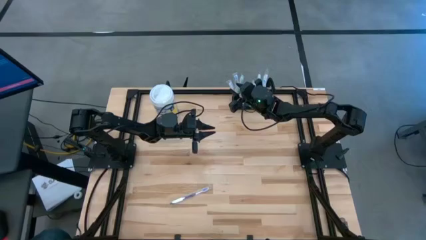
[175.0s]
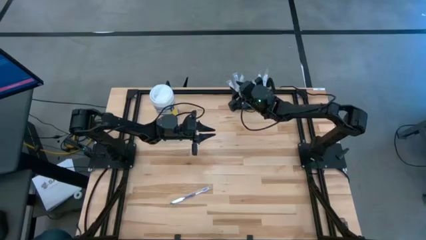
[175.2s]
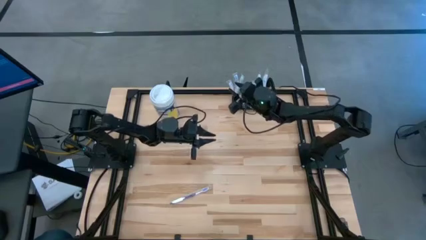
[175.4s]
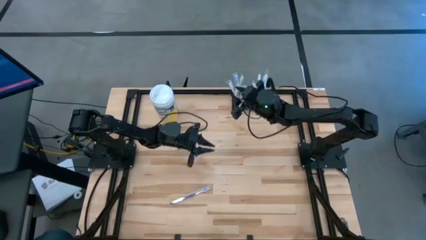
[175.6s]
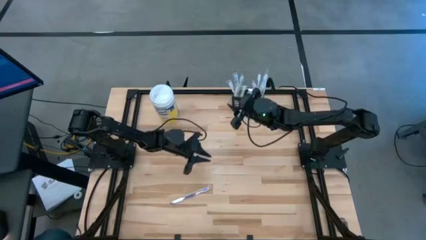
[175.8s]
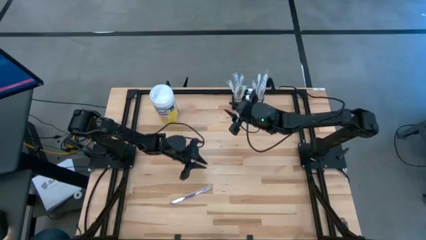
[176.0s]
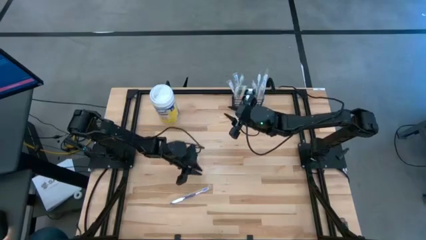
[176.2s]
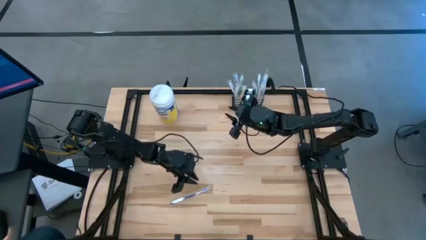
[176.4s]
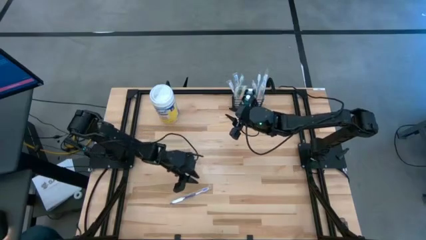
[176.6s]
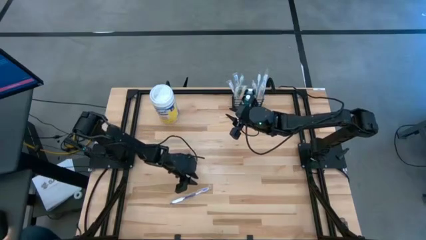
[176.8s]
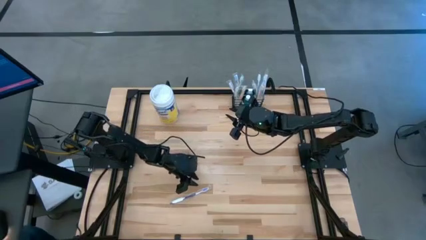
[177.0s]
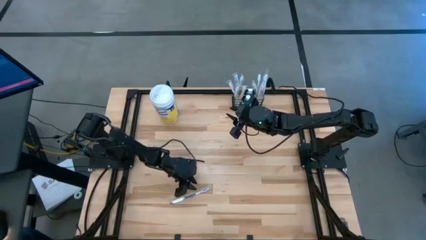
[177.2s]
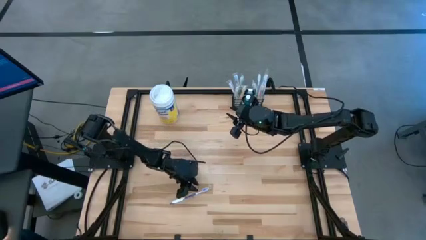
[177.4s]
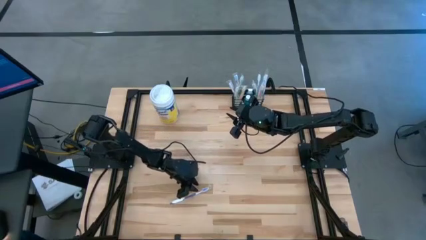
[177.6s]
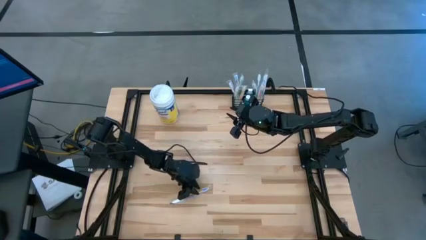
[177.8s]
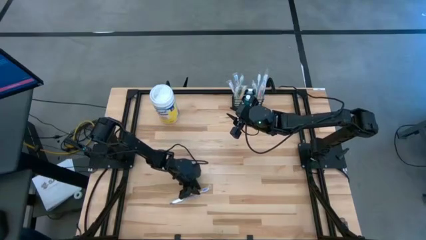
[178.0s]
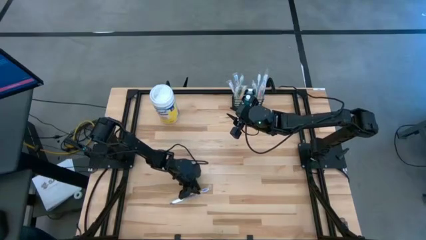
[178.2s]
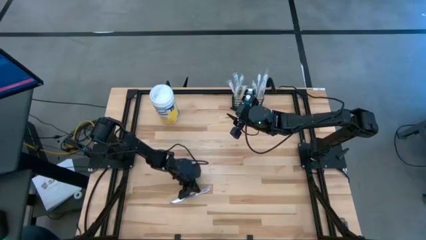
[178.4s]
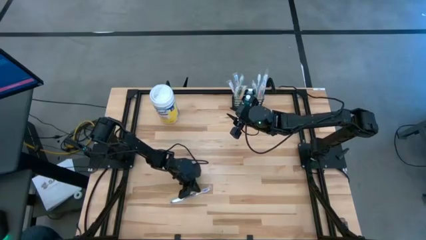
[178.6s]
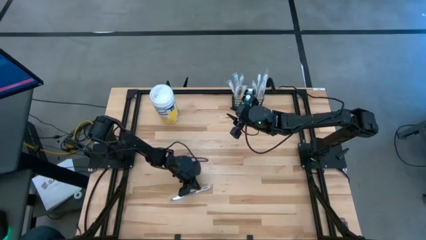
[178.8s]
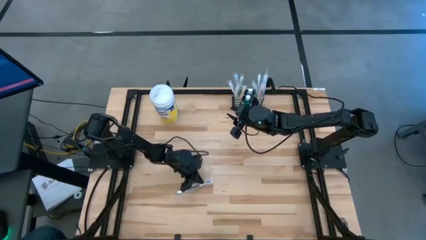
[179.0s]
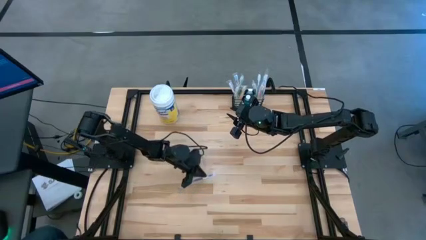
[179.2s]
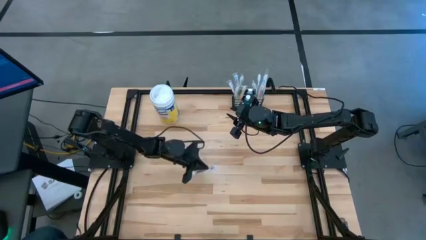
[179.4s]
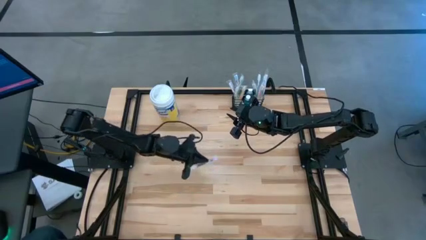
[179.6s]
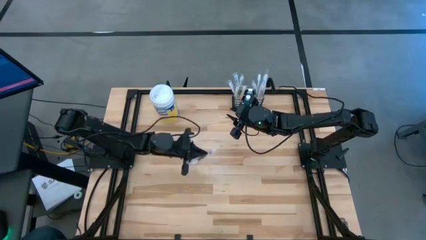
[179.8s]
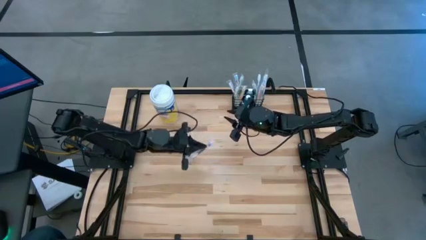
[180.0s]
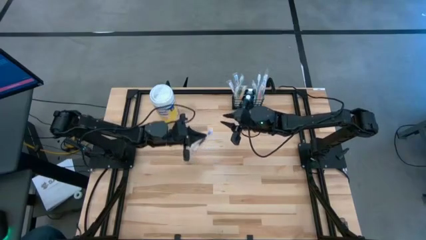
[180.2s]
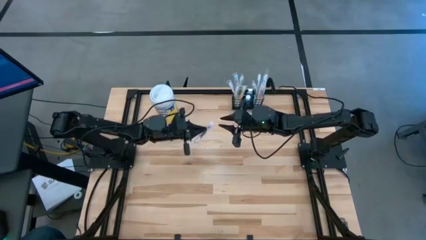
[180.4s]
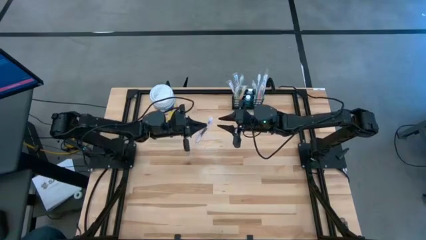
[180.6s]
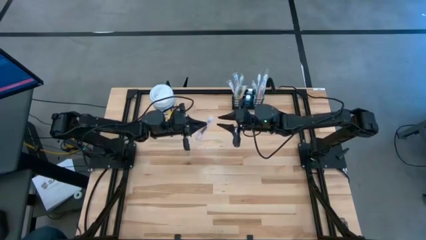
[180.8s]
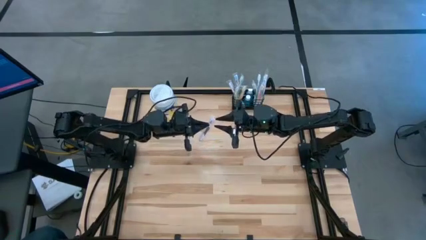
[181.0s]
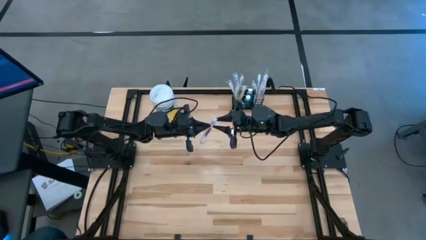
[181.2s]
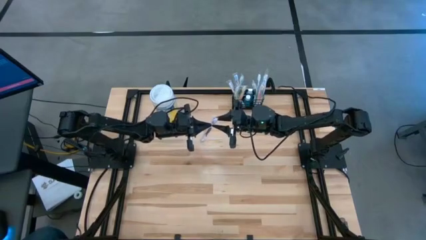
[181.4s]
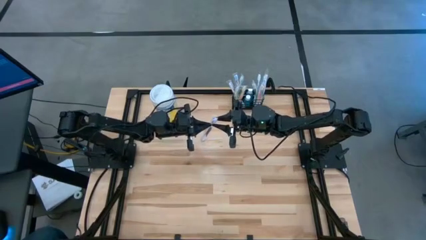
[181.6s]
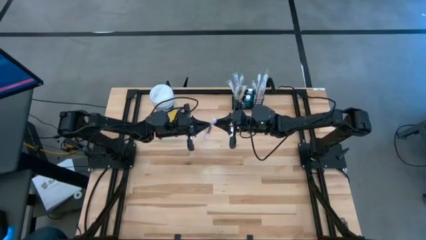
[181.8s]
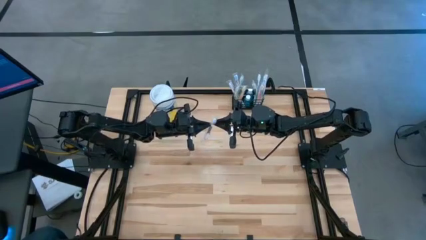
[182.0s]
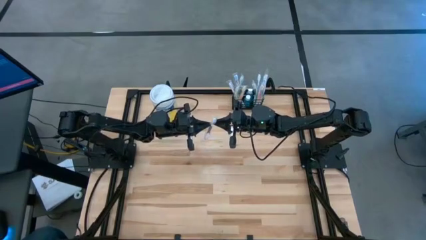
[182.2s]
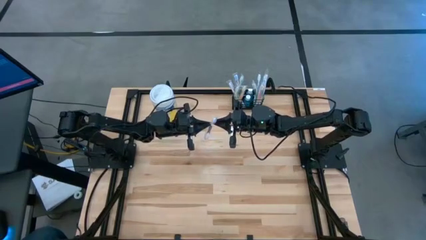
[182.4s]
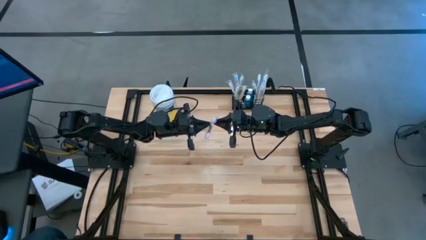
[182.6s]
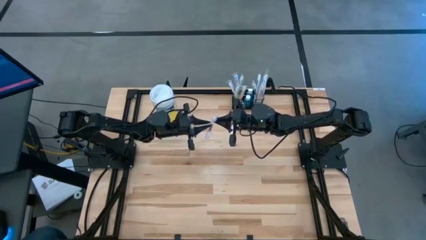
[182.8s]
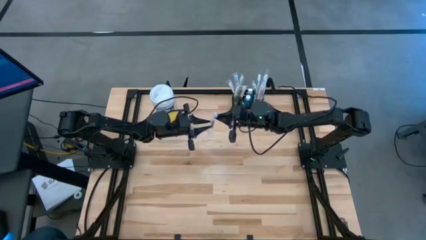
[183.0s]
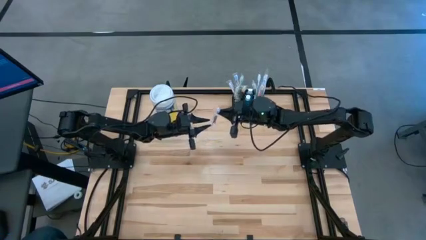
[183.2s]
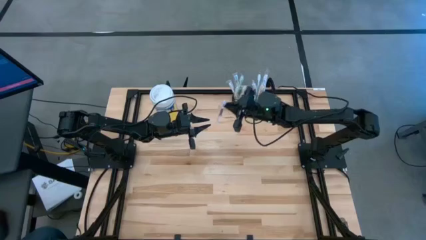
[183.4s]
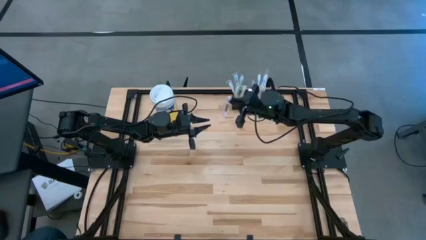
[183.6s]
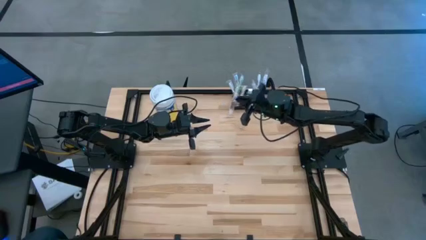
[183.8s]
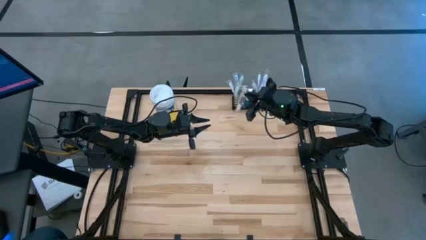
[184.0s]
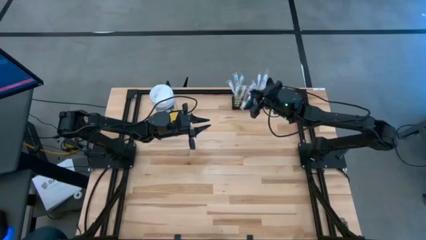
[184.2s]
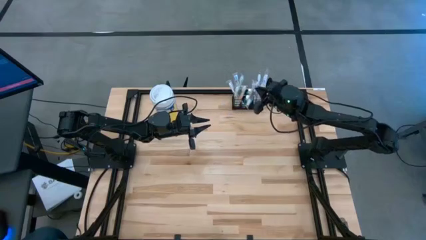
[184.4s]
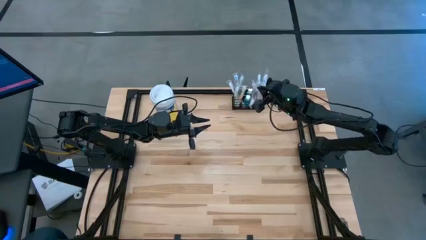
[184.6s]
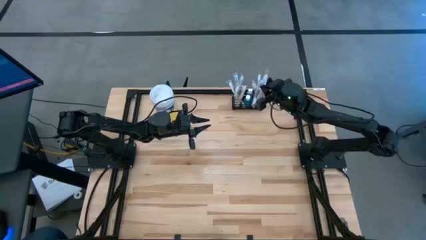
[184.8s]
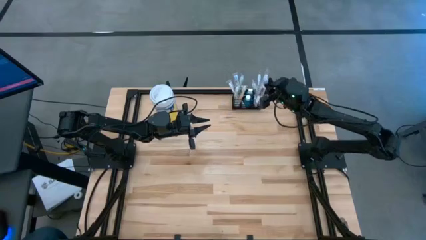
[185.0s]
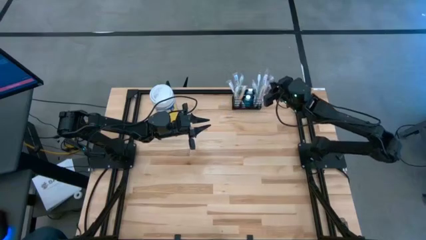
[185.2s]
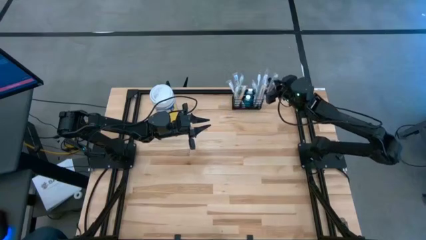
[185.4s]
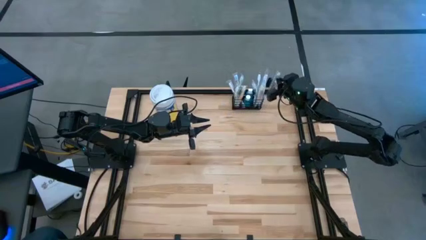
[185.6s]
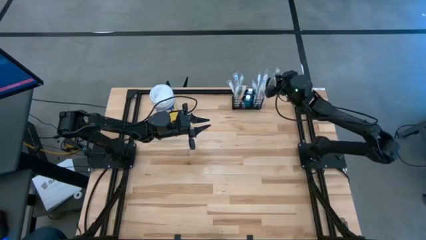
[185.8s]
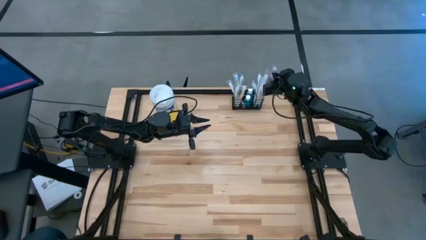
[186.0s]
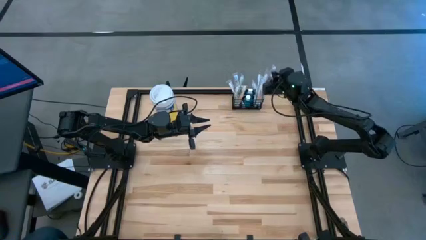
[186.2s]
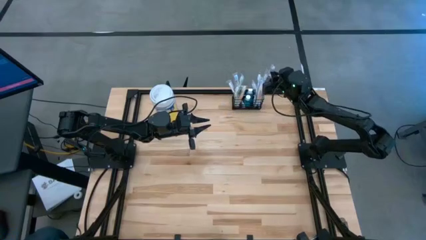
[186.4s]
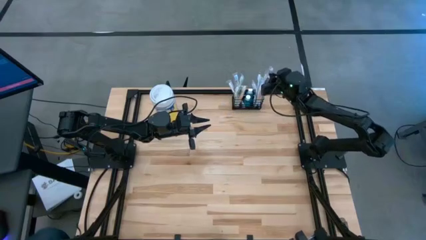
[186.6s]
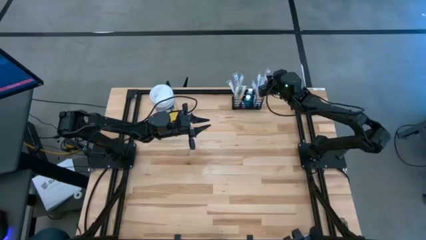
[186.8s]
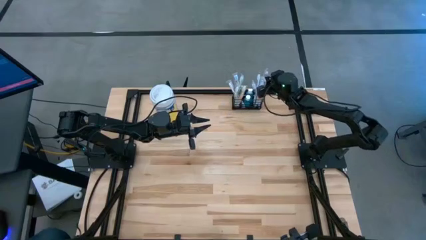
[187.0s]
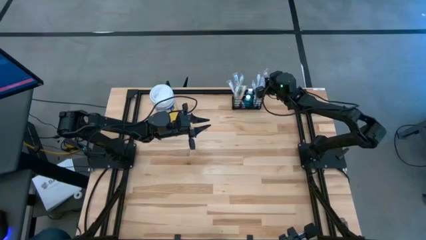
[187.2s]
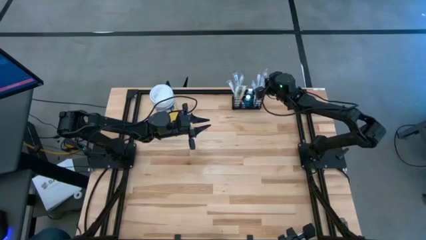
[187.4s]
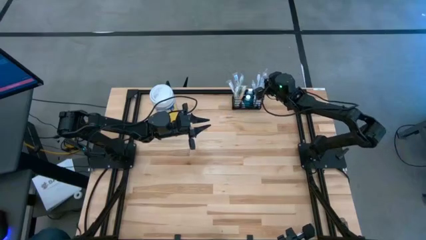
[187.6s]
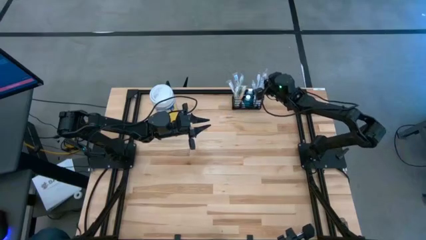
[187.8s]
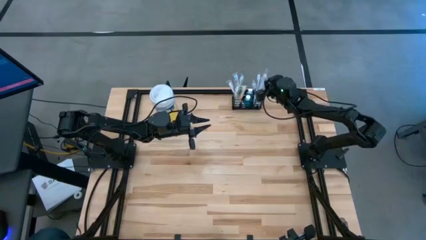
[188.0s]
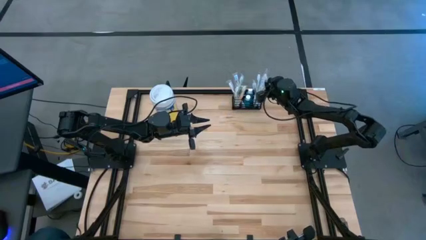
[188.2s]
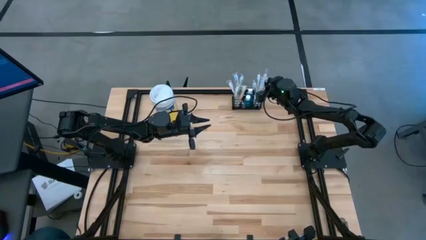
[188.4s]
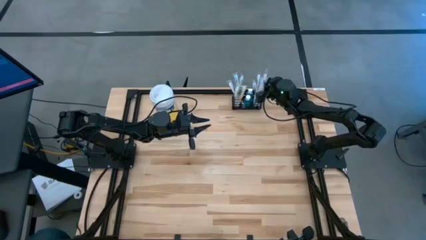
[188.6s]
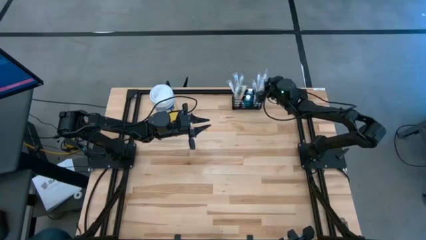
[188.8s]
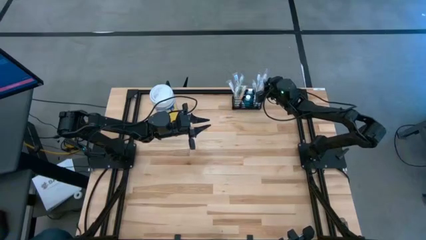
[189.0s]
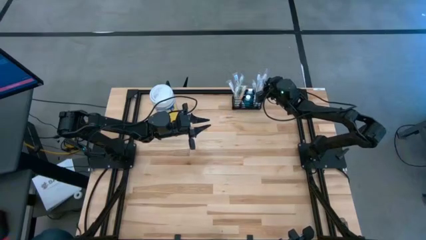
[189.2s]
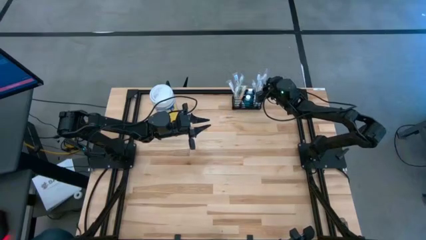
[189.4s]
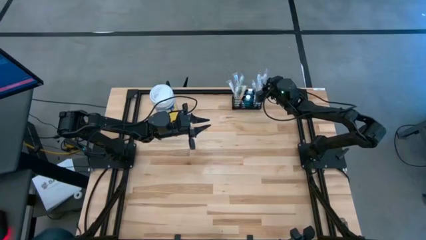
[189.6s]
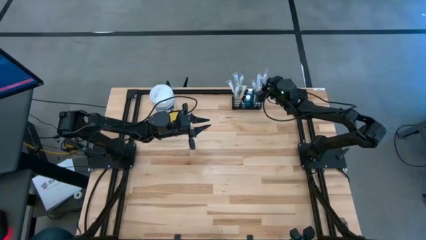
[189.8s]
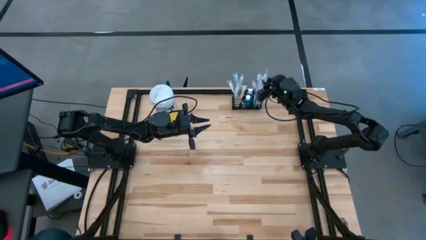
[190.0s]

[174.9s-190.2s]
Task: Pick & Place toothbrushing station
Put the violet toothbrush into the black mesh organizer

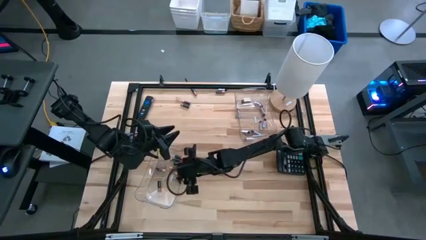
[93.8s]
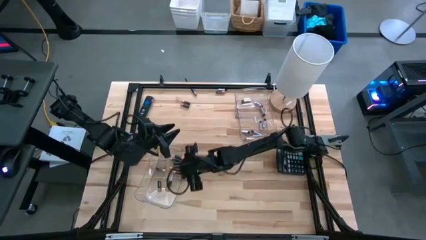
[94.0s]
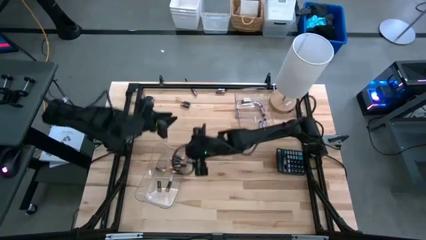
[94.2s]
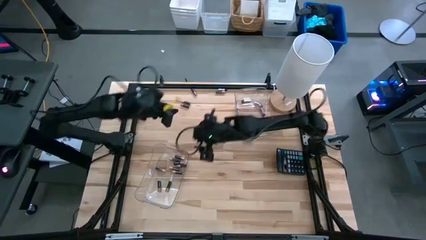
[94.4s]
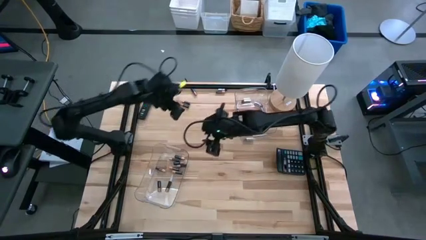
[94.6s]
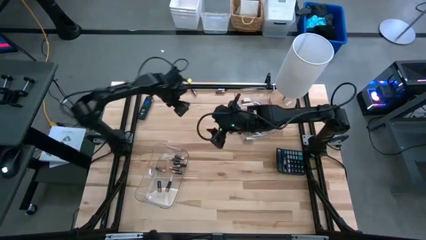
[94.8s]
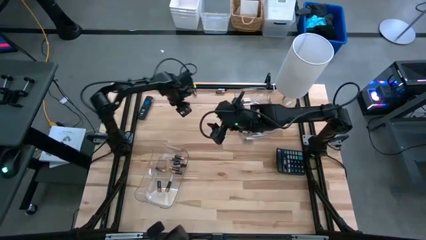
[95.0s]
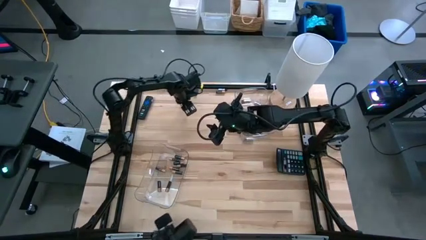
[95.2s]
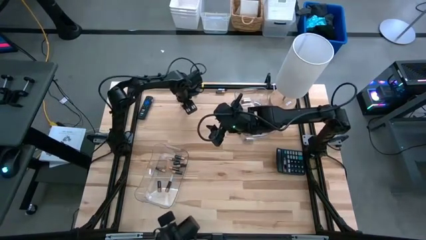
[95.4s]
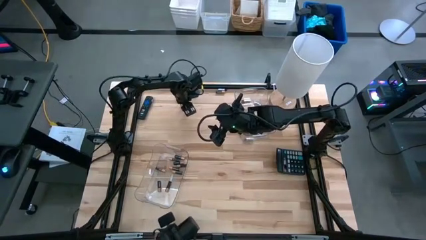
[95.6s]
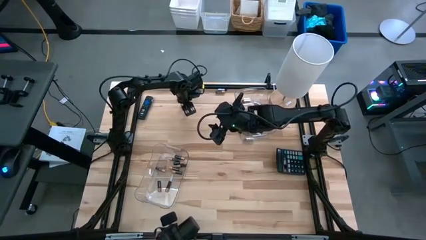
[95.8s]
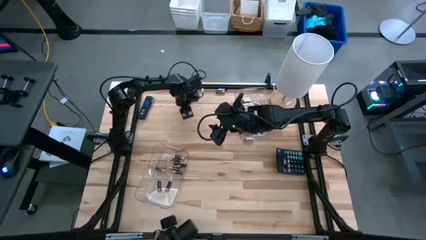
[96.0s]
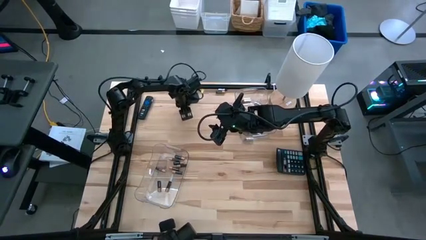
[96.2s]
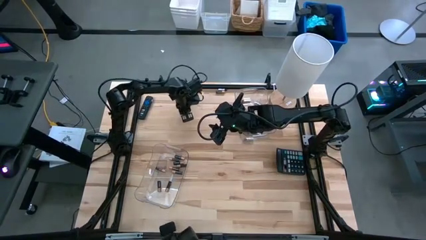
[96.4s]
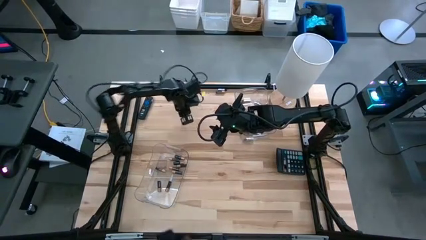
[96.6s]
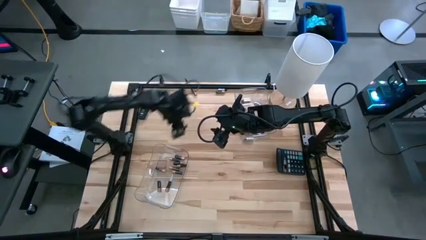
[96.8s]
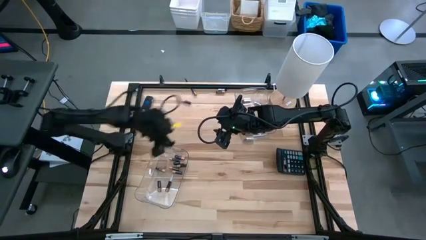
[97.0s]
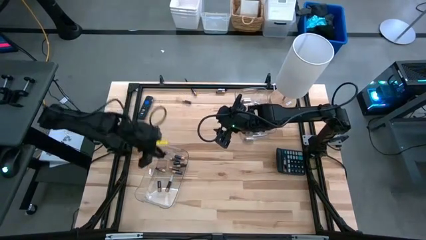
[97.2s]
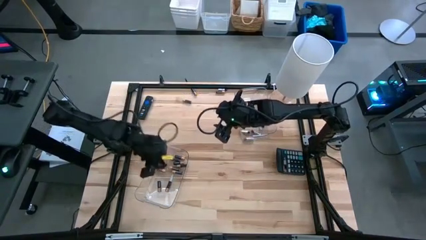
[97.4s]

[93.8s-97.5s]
Task: Sort batteries
Put the brown battery into the left transparent bin
